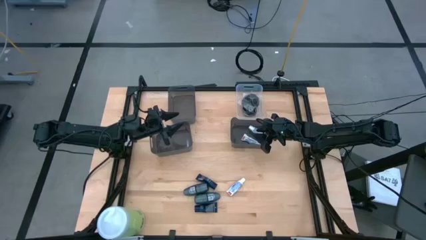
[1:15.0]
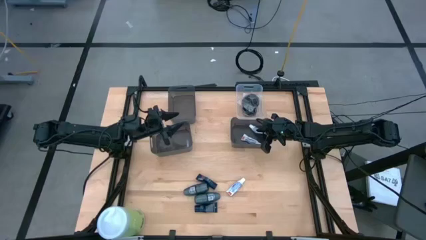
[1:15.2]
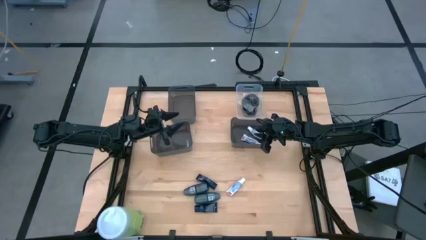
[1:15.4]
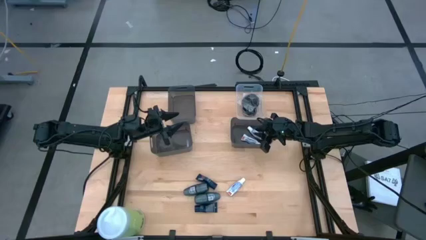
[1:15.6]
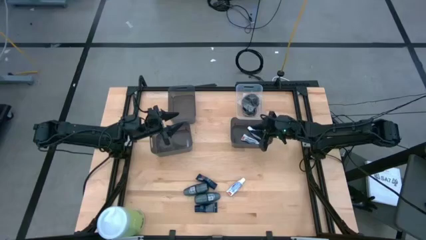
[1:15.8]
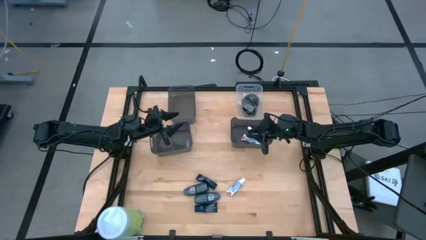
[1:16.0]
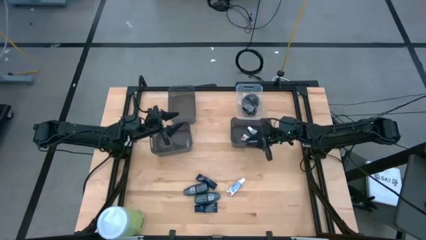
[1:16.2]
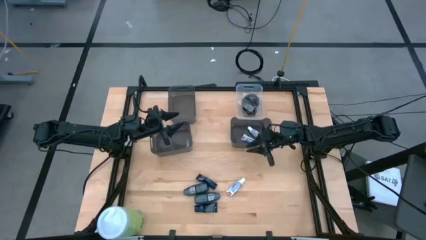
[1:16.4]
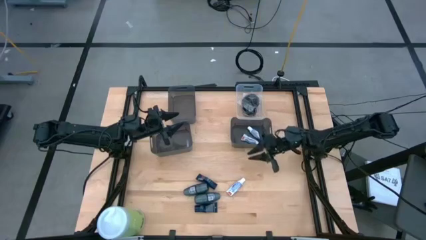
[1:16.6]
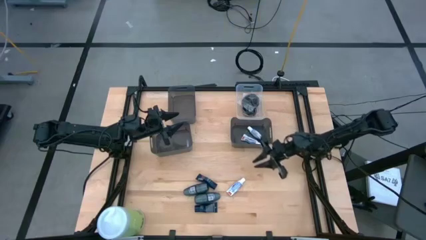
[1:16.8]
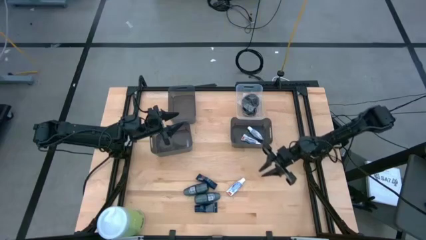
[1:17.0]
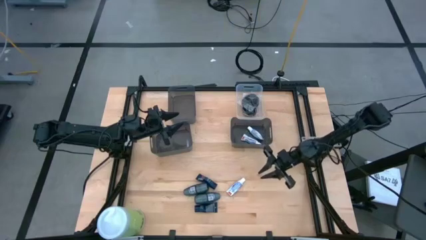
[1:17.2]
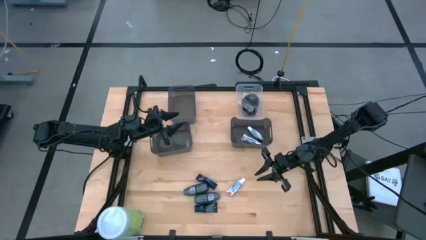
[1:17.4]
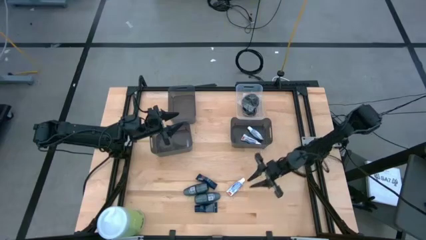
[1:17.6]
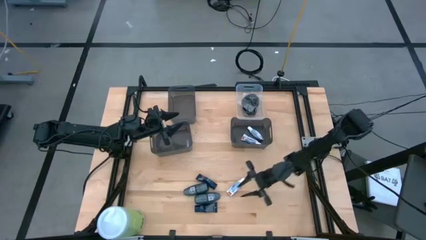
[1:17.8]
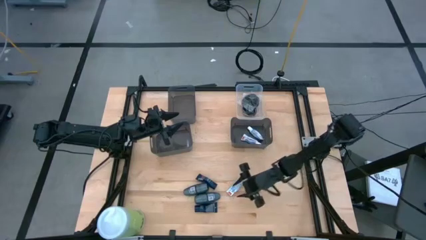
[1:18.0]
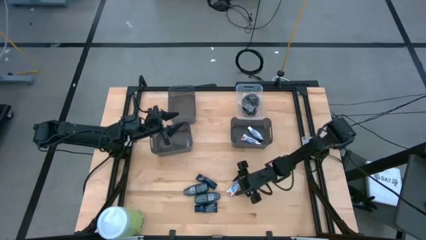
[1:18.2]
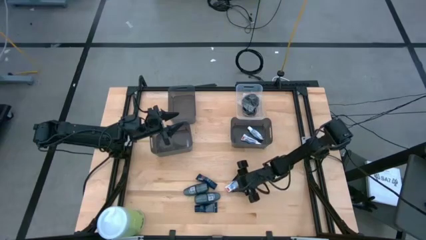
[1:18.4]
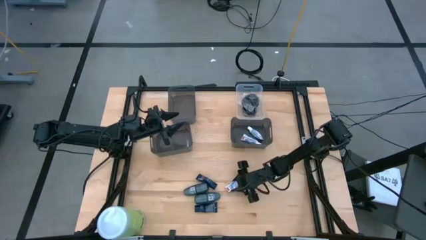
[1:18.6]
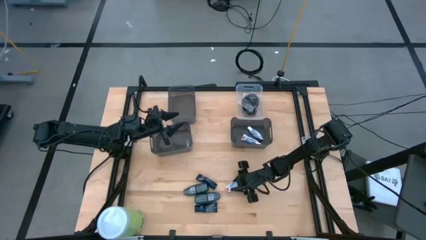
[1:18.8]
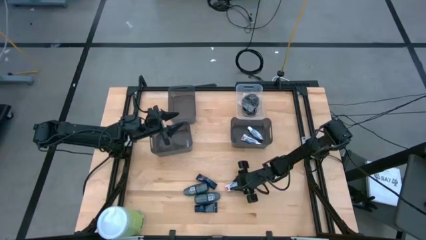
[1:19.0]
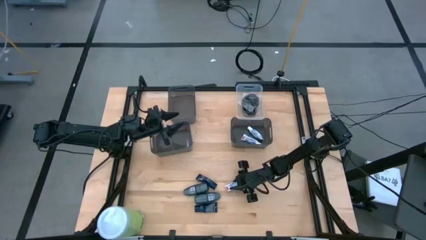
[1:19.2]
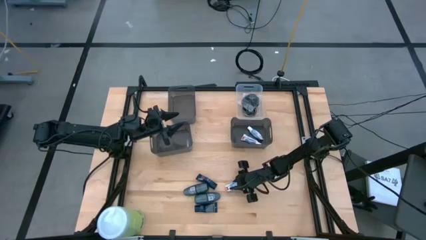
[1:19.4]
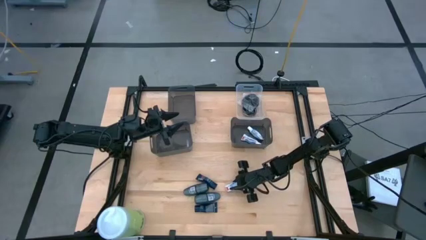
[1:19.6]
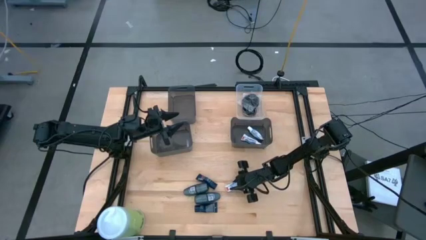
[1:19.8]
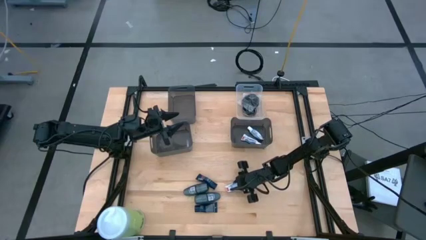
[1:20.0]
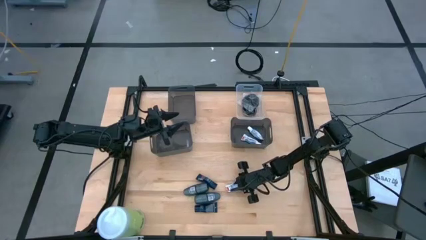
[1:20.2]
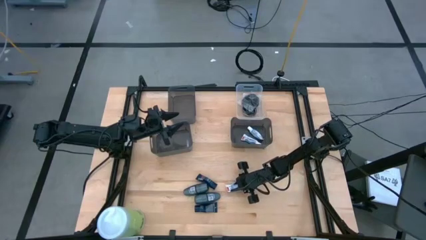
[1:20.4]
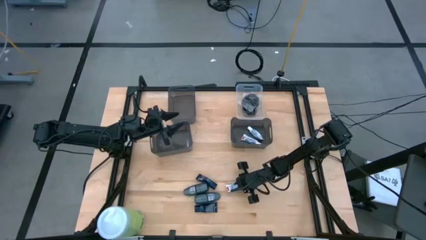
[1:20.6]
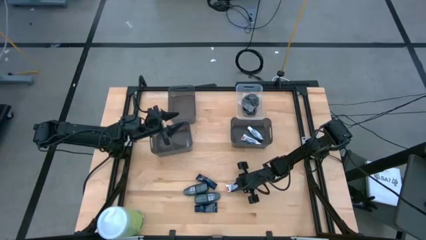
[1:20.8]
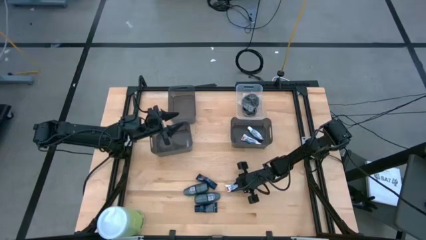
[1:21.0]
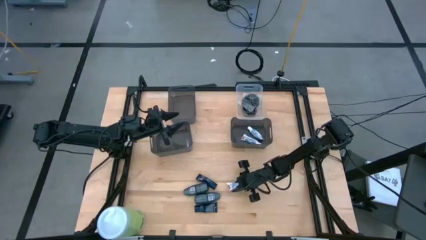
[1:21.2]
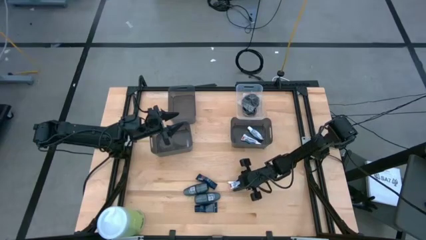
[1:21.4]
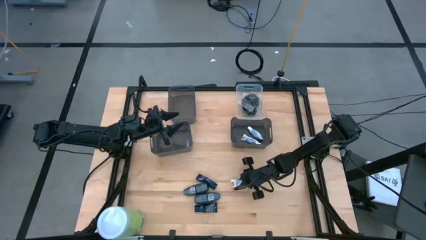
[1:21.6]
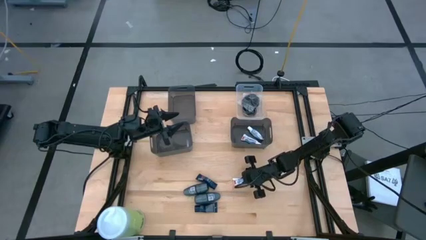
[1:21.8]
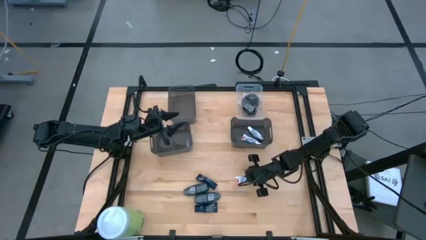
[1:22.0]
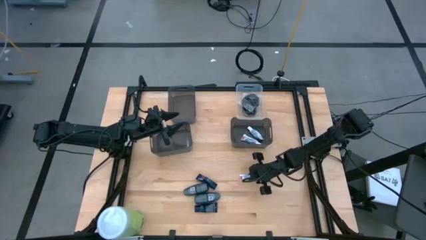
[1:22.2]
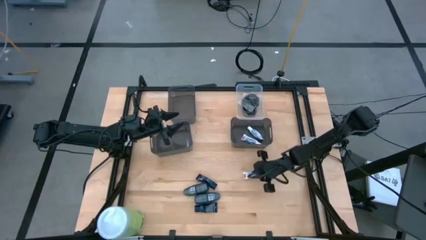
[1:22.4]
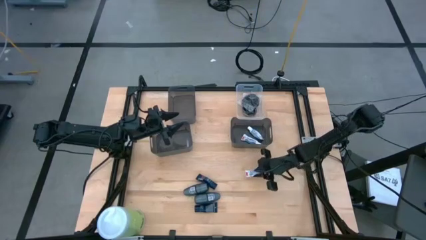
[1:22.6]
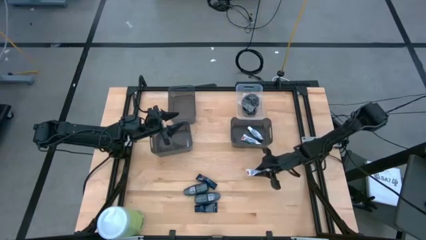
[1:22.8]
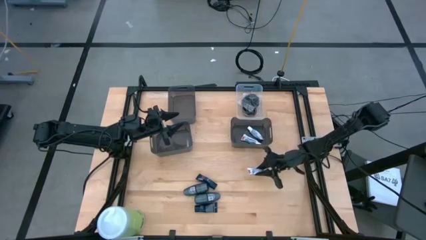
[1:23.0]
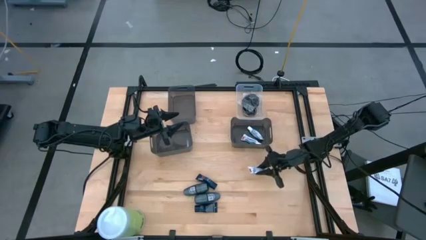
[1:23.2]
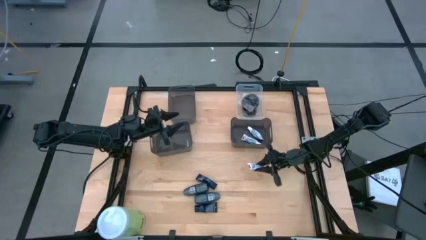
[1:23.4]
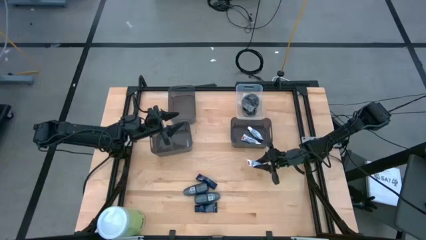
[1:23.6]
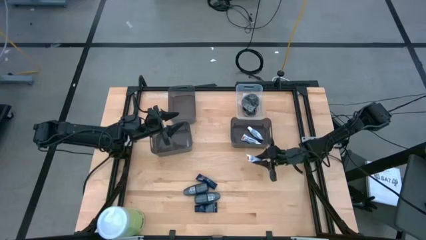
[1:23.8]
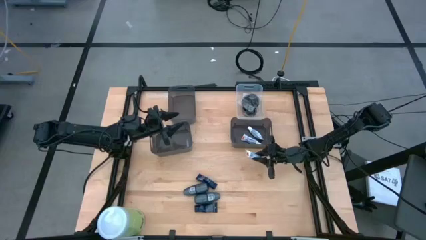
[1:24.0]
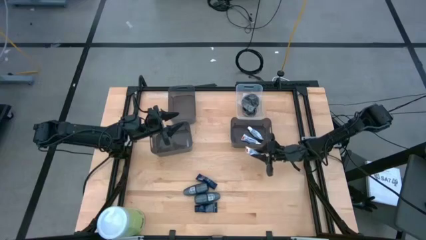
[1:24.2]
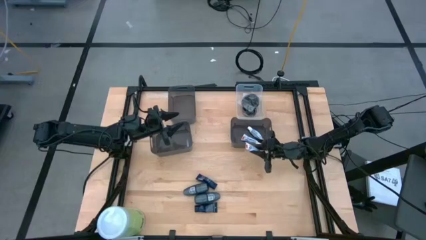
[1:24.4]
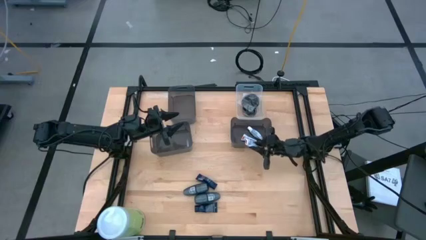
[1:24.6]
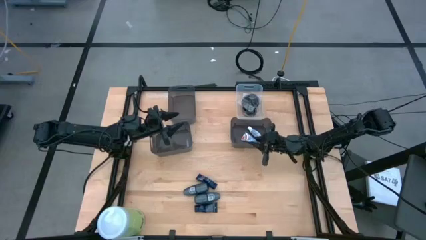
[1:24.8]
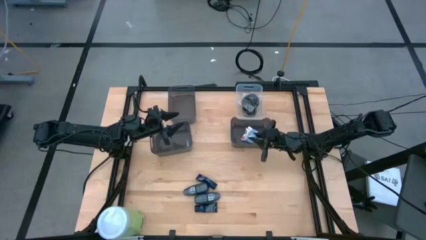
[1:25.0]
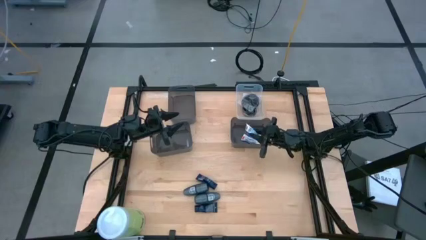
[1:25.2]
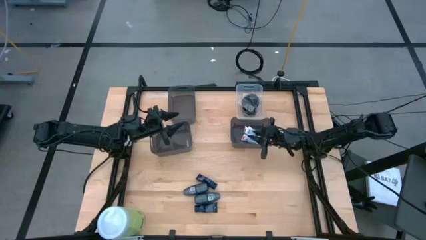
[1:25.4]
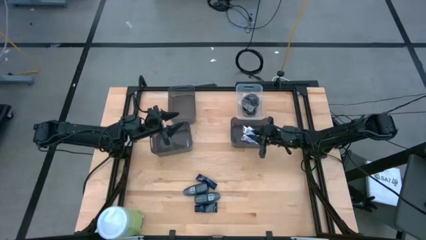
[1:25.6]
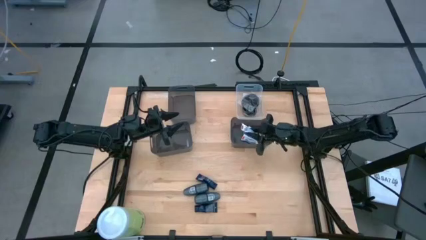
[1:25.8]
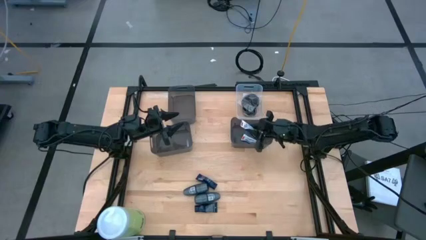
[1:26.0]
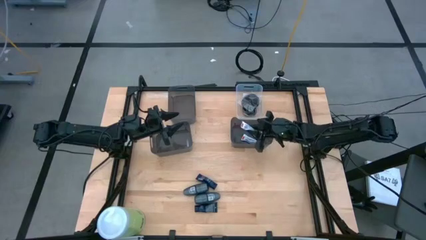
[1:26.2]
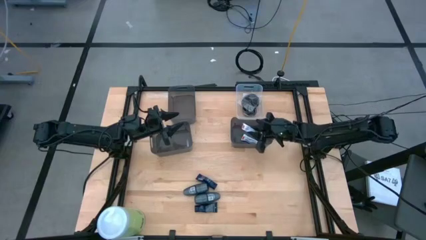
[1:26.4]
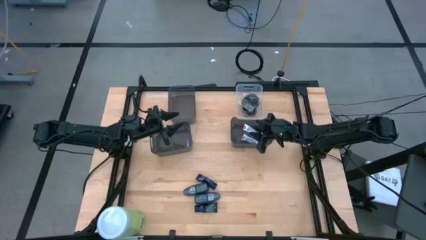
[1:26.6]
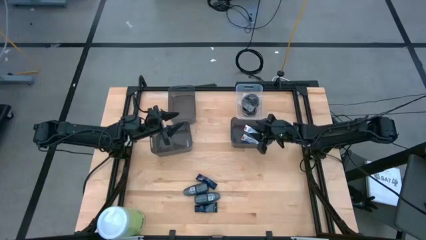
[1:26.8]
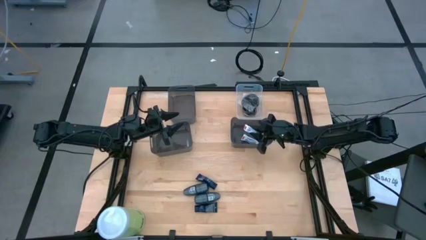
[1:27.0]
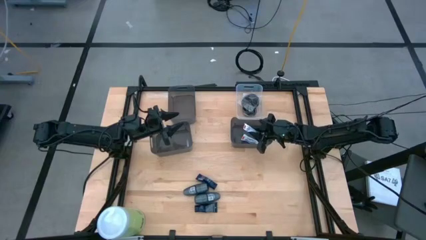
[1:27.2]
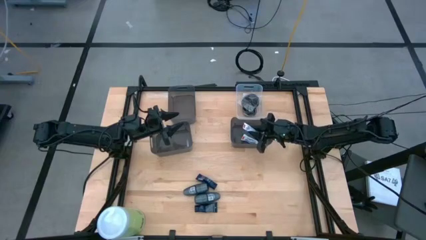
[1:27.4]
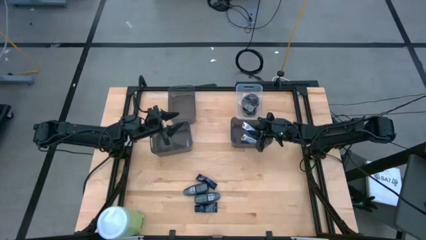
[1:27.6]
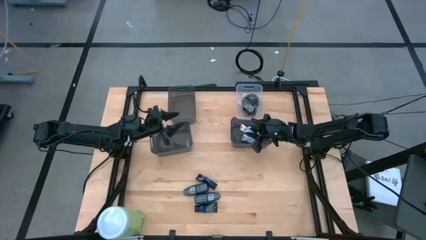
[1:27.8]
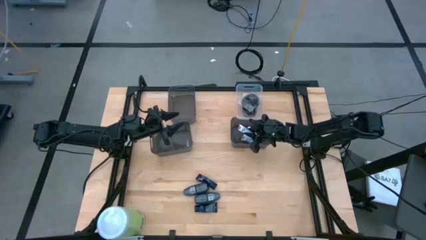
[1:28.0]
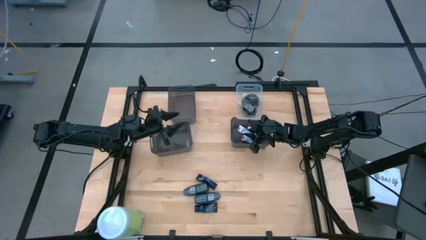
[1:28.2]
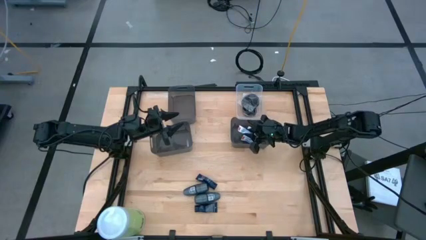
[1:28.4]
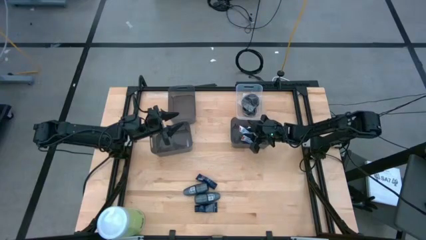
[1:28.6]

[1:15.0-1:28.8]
Task: Pick & Place Travel size toiletries
Put the white toothpaste into the bottom right black bin
